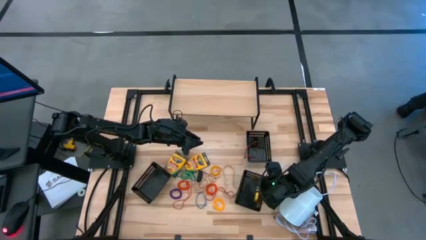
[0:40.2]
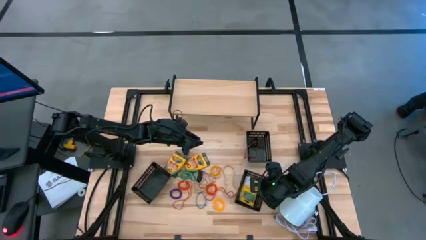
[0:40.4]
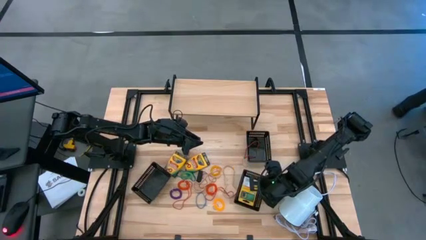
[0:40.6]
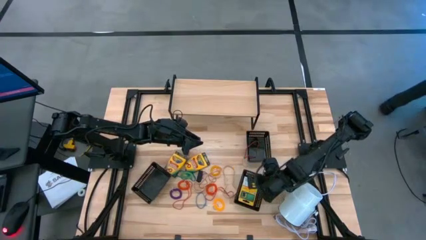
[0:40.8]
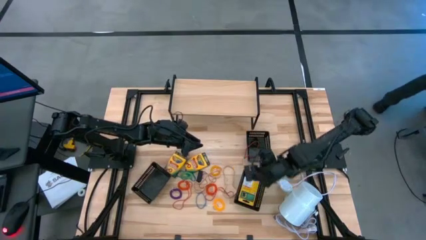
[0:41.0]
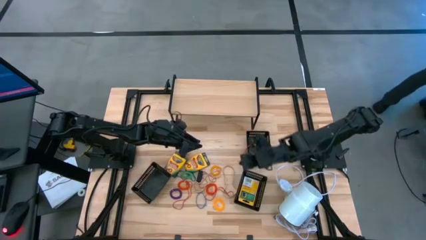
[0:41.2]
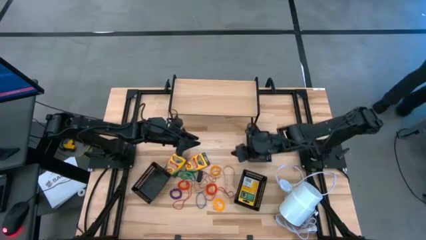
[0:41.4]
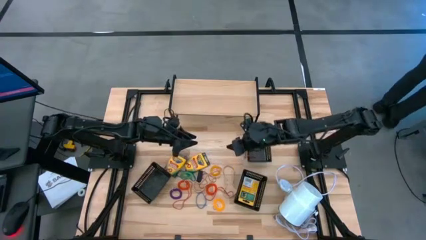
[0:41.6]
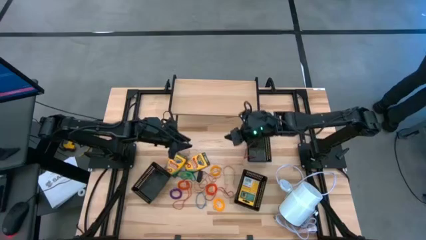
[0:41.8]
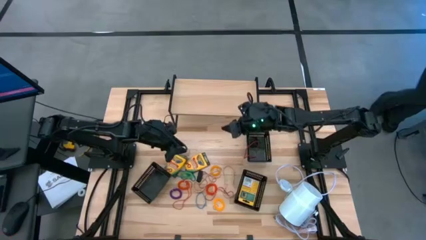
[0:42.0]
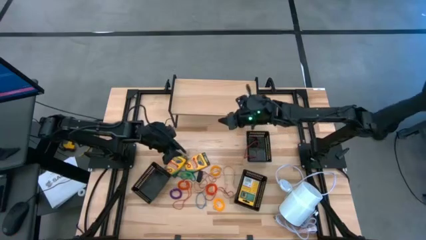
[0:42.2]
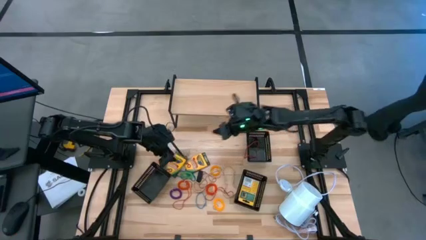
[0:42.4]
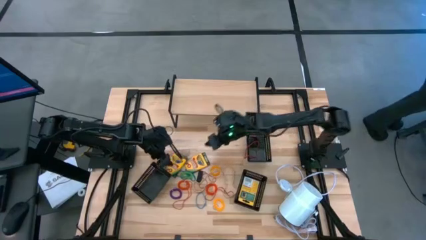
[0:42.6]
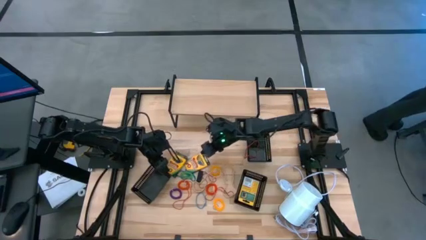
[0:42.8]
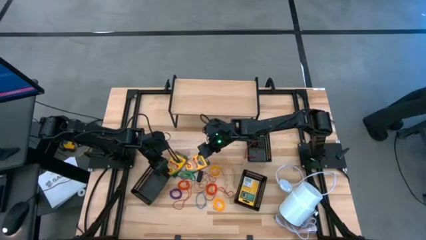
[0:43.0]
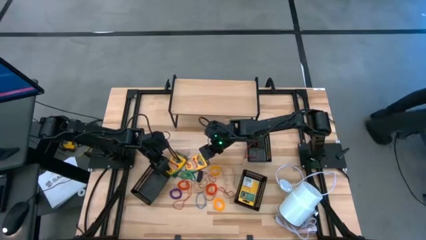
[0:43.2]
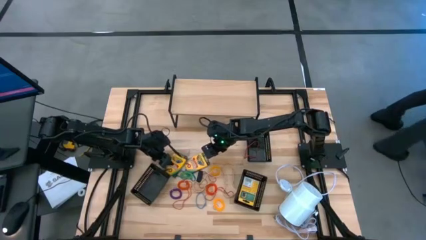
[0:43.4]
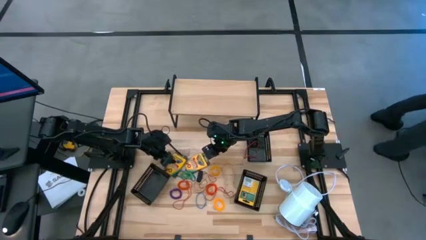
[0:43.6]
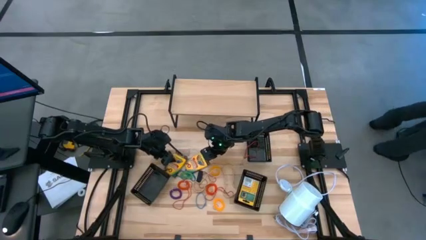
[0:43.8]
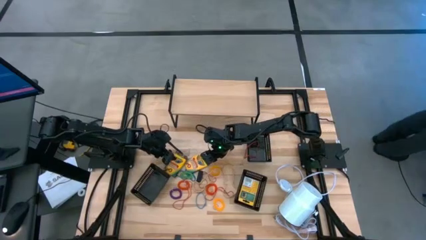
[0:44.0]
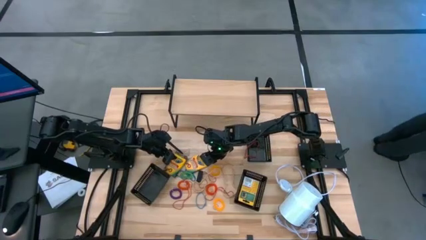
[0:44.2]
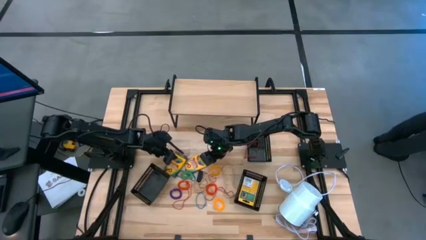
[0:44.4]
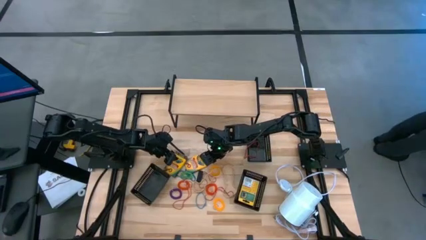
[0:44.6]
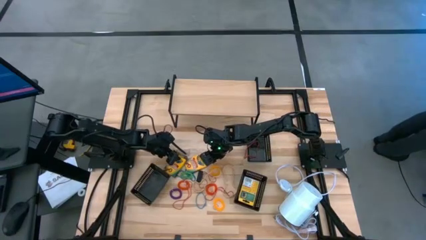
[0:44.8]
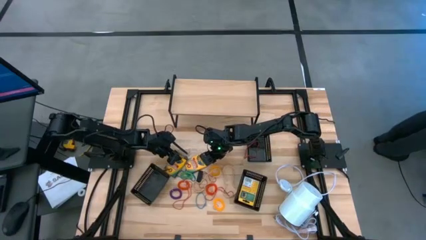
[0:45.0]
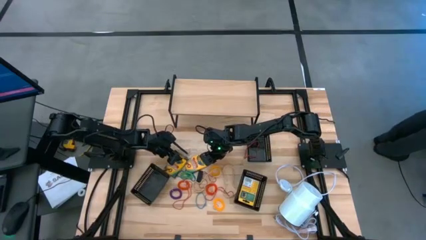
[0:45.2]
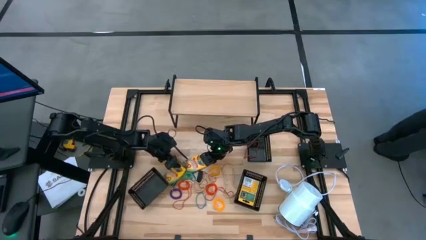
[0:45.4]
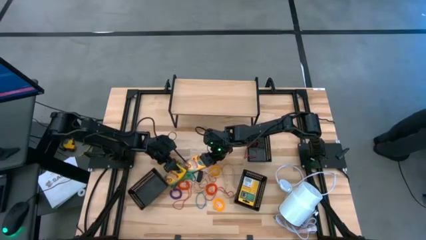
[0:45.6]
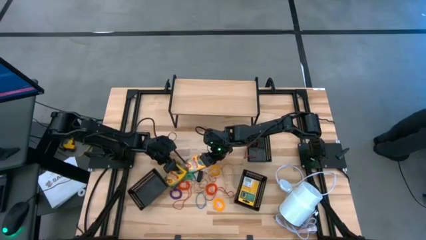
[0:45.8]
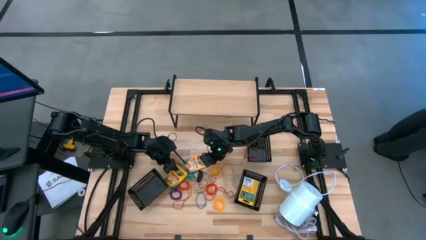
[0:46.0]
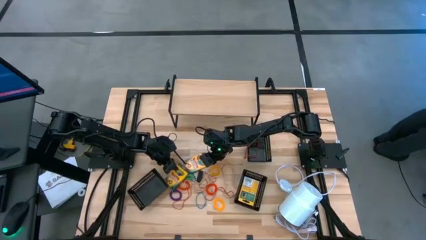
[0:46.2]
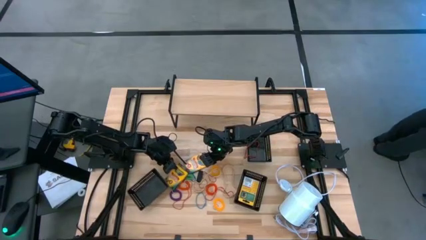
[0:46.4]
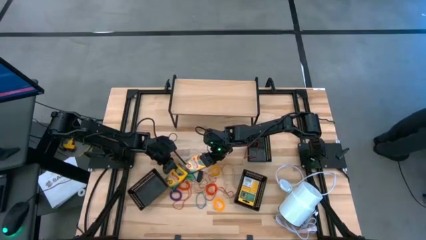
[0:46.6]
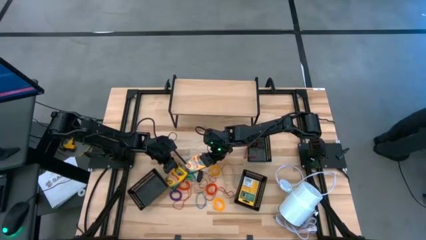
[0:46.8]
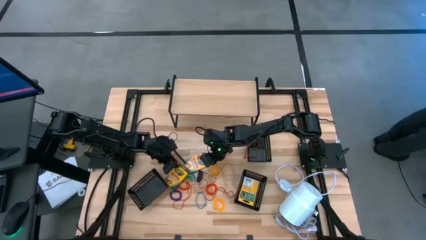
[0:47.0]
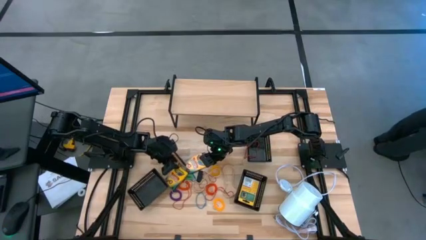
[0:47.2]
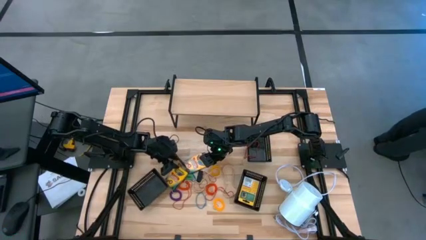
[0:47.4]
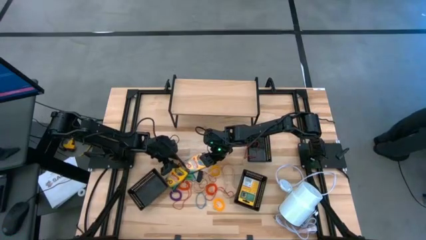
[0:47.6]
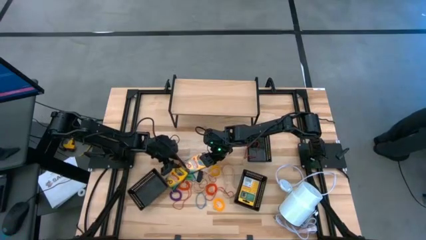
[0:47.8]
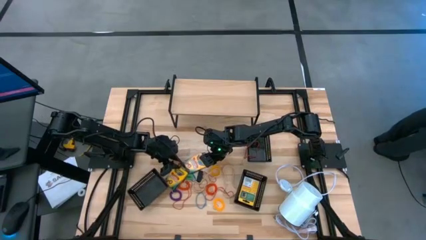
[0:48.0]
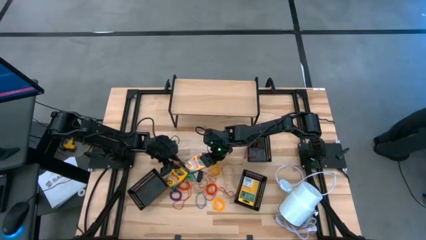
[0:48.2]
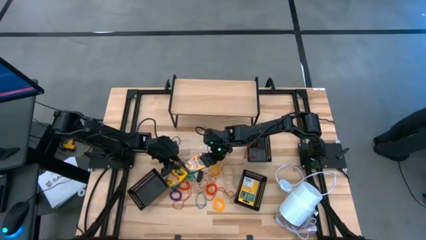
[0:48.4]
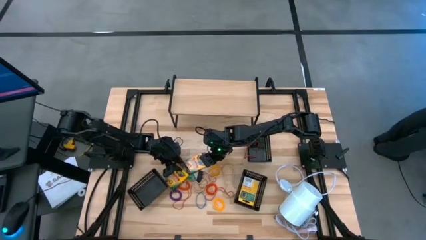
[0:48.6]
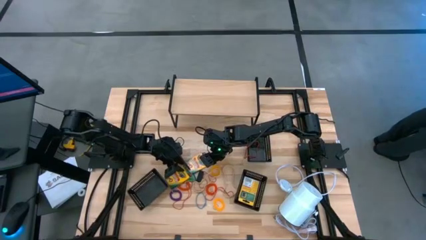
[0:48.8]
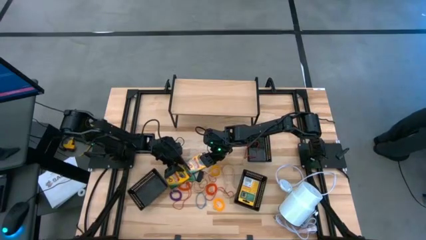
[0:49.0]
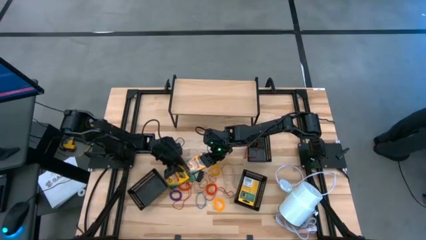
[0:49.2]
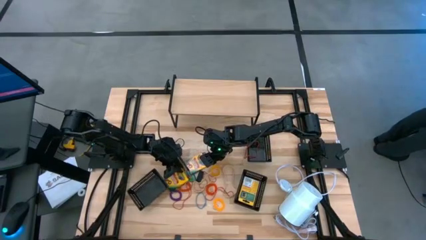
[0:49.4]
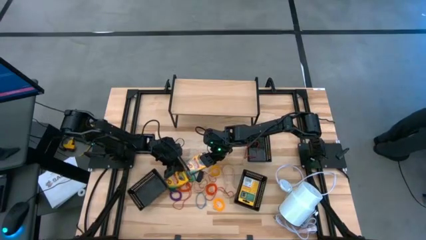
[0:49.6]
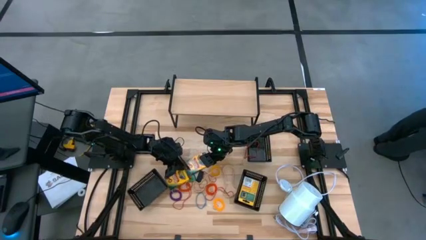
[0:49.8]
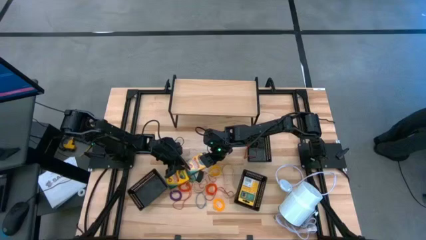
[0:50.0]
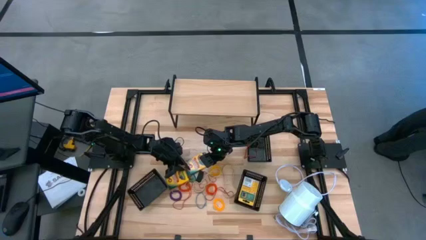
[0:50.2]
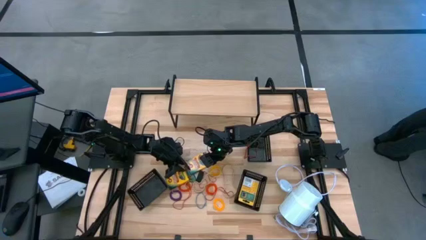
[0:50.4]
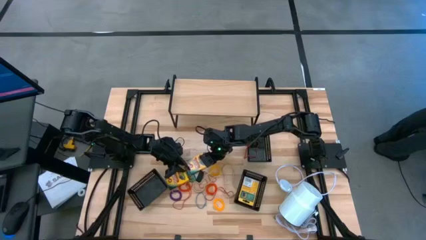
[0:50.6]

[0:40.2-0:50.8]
Task: Pick & Place Office Desk Supplies
Put the left crayon box into the bottom right black bin

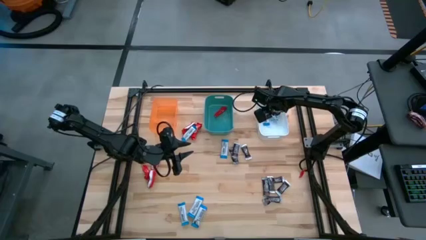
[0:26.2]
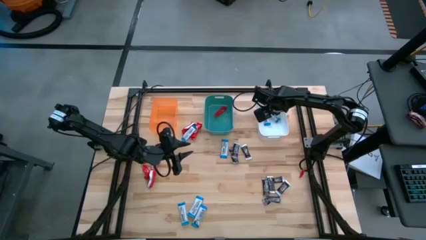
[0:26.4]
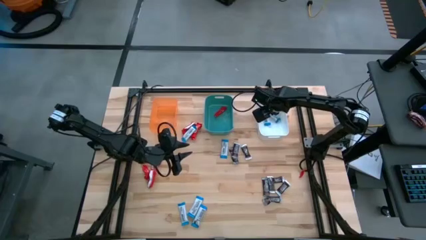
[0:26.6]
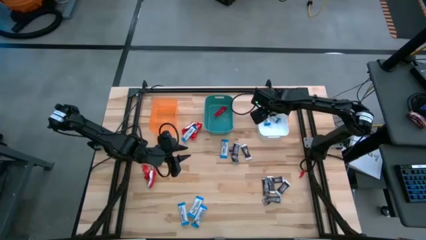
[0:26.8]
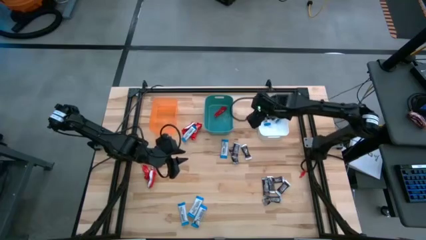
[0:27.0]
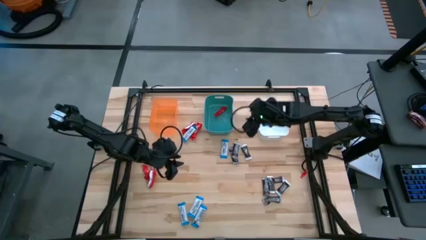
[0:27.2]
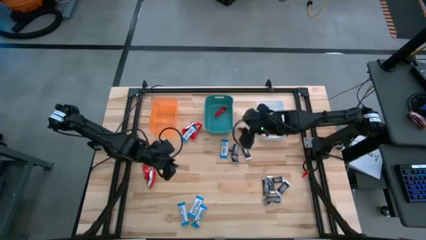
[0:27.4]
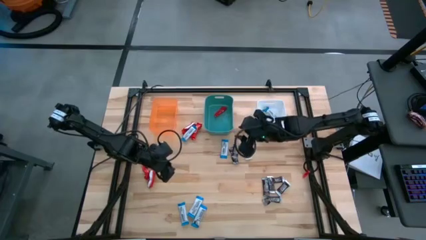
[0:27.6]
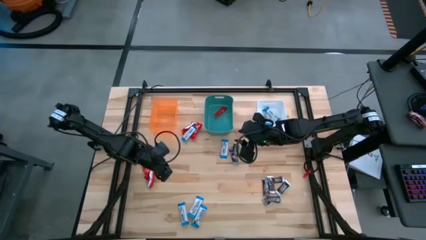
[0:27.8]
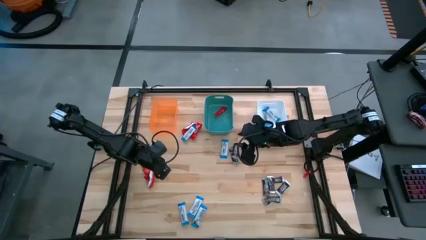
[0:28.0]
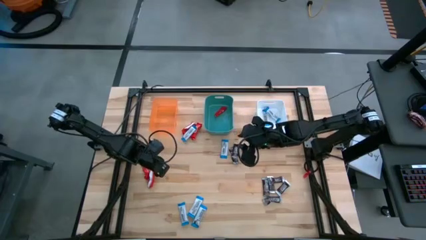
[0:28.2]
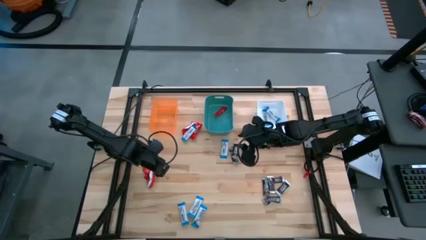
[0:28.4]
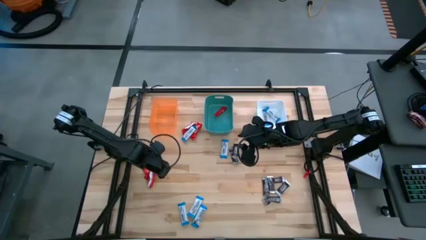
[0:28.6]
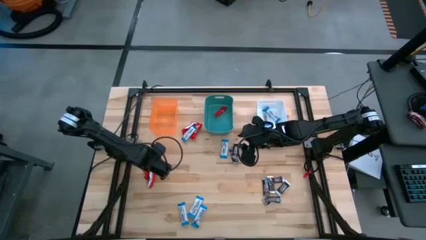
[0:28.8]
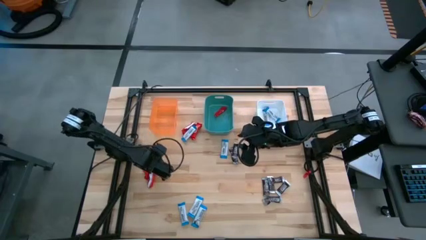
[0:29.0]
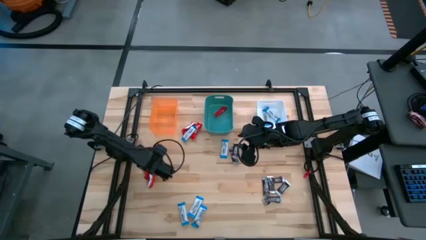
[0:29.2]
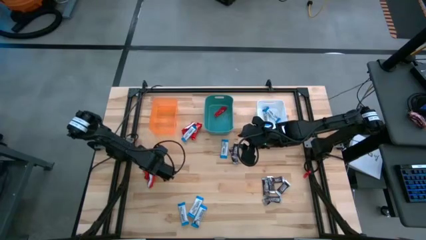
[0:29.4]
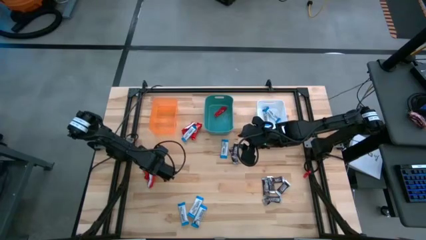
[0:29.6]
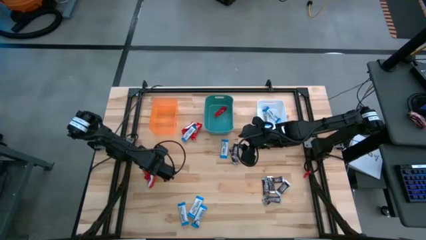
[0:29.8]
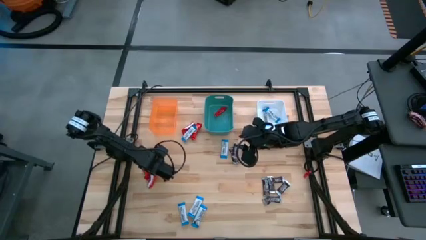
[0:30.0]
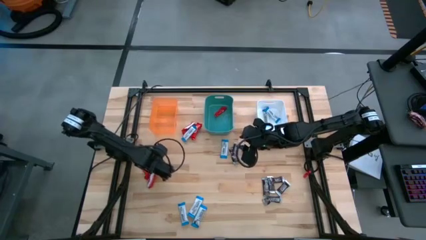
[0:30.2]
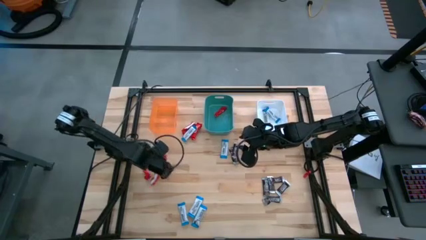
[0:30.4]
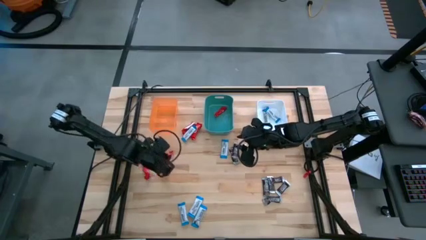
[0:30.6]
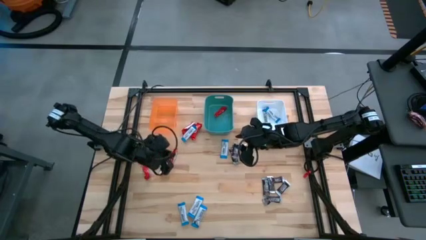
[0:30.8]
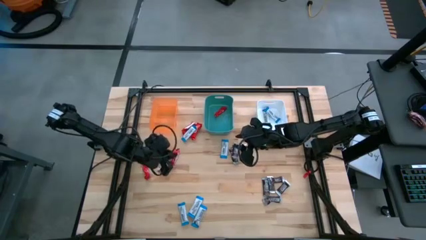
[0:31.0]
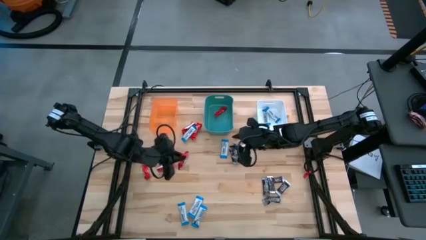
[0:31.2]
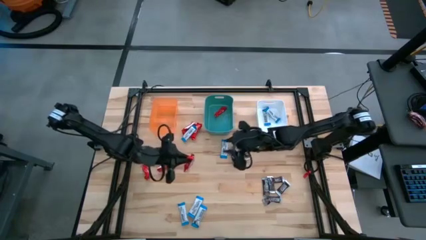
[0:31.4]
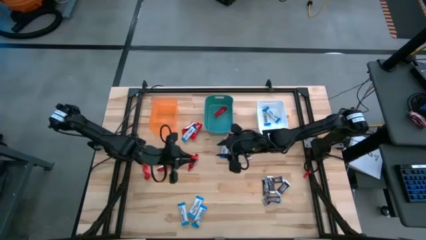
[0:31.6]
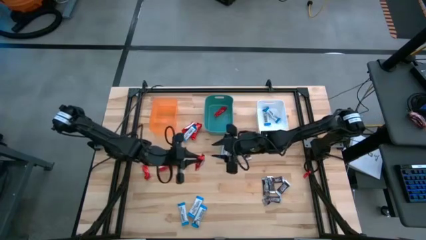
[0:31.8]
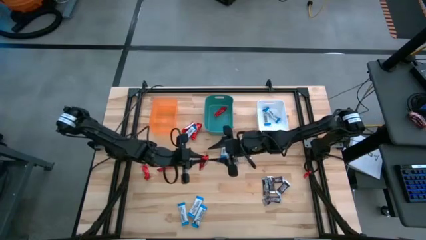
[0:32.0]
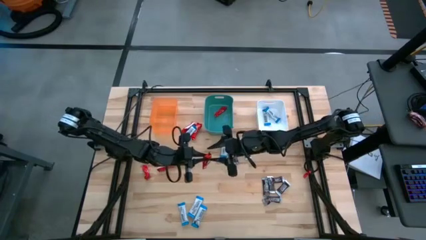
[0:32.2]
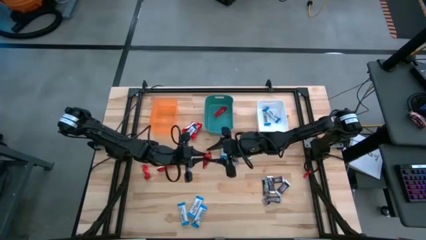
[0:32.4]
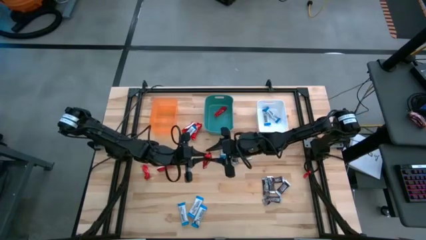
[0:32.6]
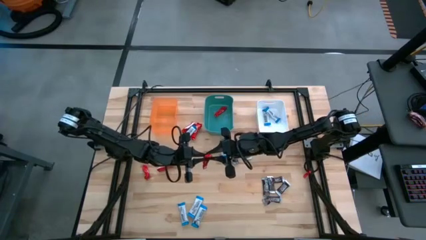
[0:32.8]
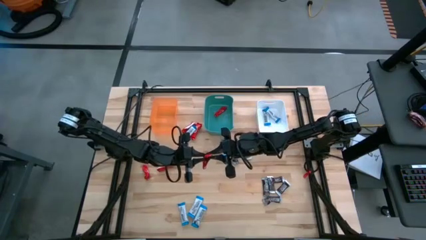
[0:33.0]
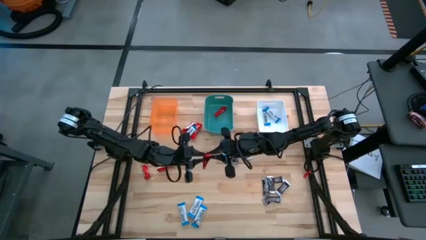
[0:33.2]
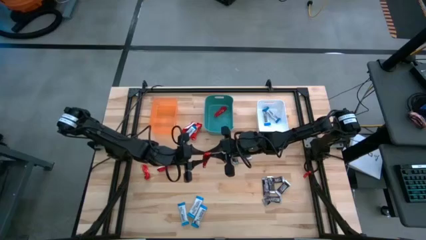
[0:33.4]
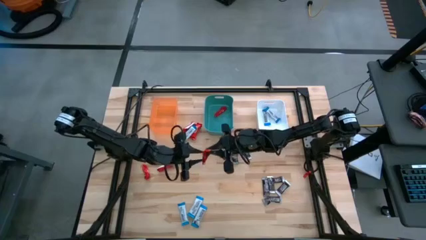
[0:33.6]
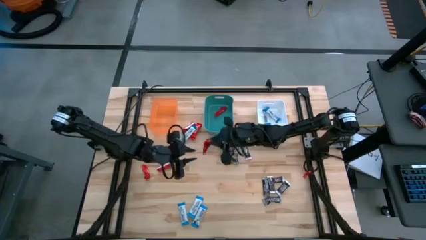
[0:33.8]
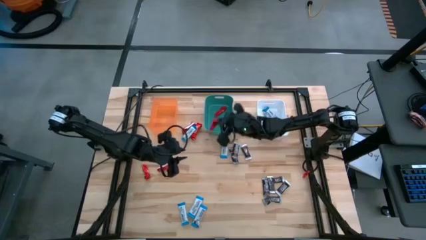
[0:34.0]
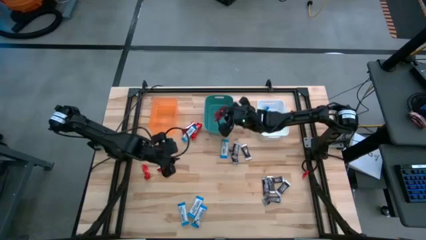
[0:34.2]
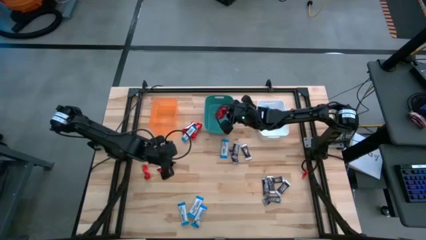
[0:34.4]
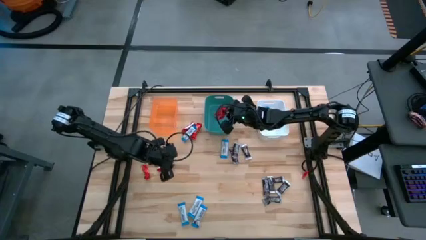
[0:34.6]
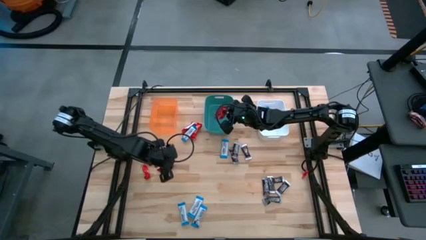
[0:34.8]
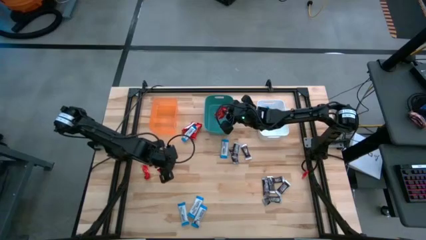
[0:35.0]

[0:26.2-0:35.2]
Task: Organize candy in baskets
Put the red chocolate bar into the green bin
